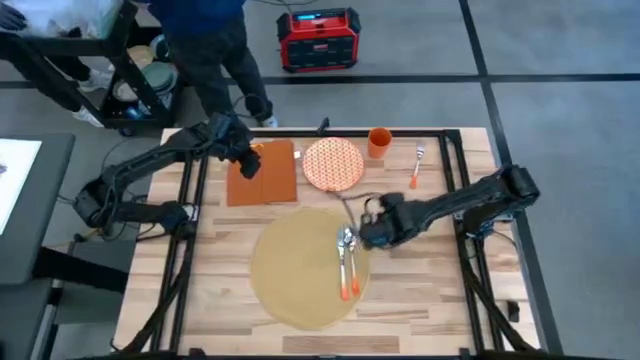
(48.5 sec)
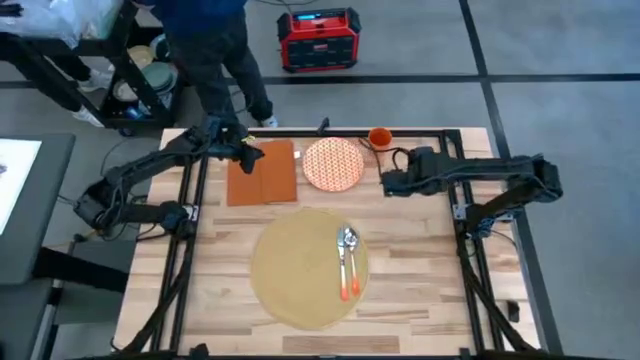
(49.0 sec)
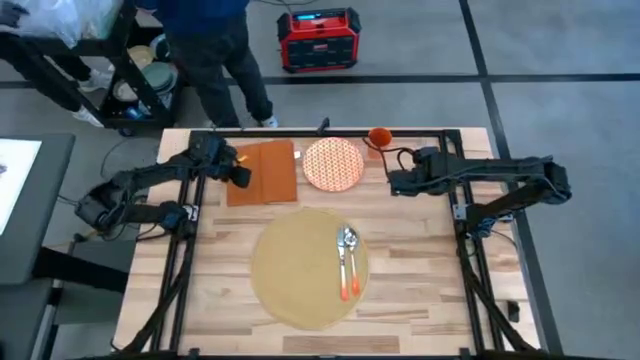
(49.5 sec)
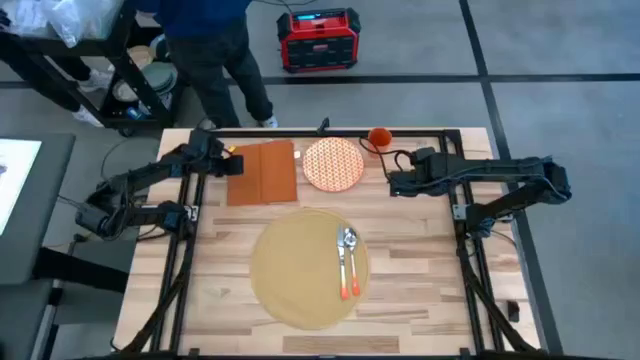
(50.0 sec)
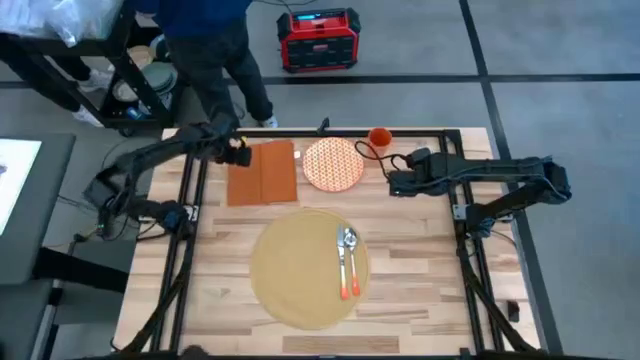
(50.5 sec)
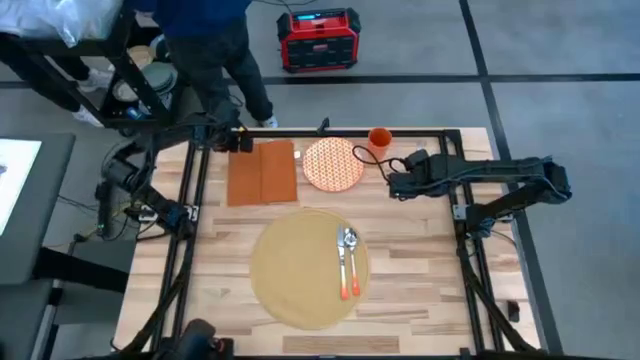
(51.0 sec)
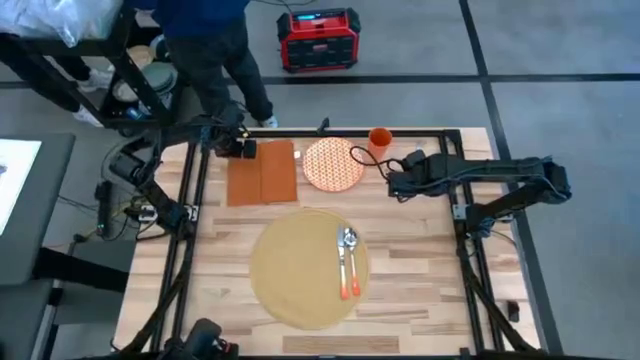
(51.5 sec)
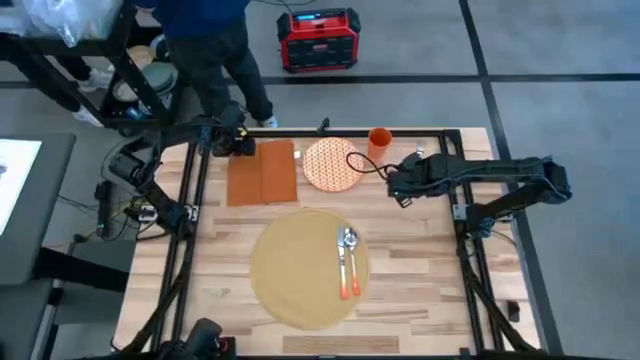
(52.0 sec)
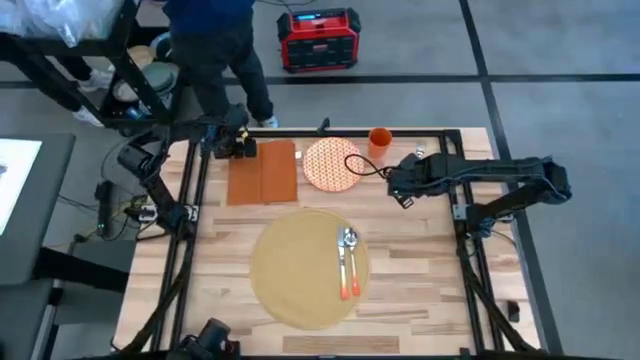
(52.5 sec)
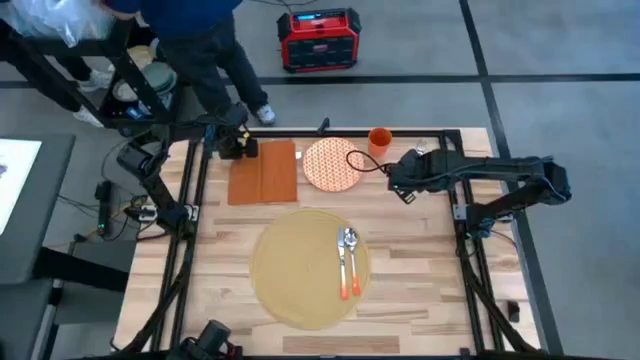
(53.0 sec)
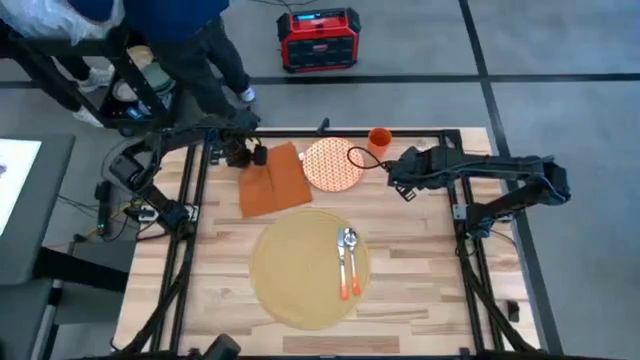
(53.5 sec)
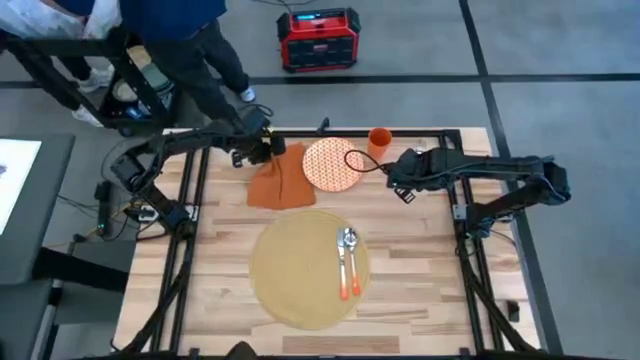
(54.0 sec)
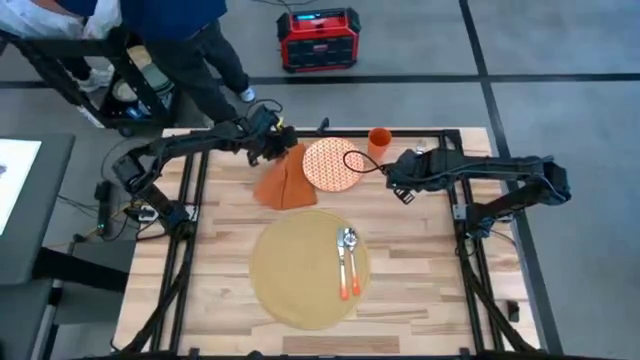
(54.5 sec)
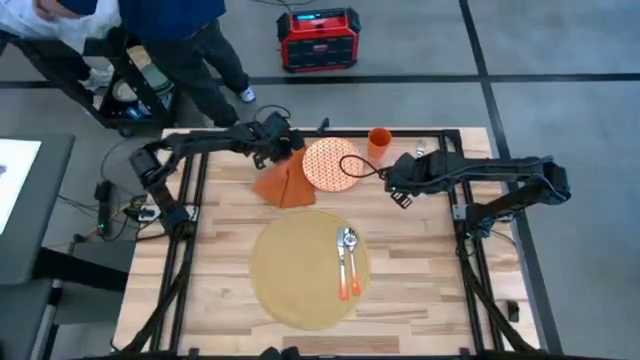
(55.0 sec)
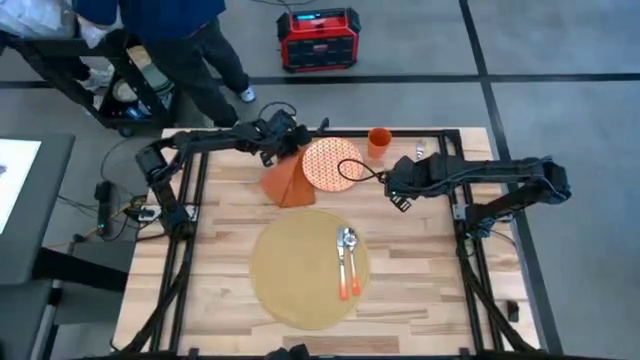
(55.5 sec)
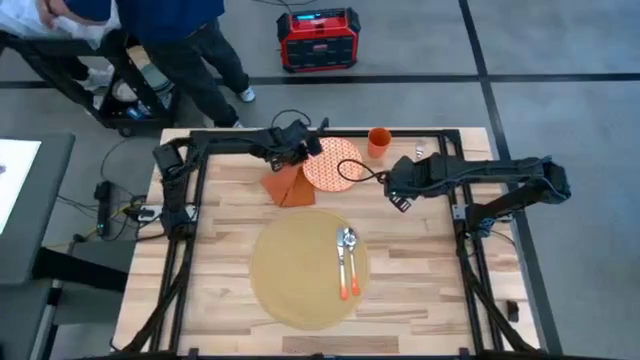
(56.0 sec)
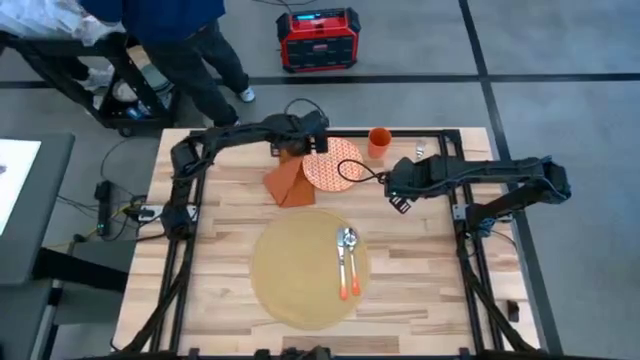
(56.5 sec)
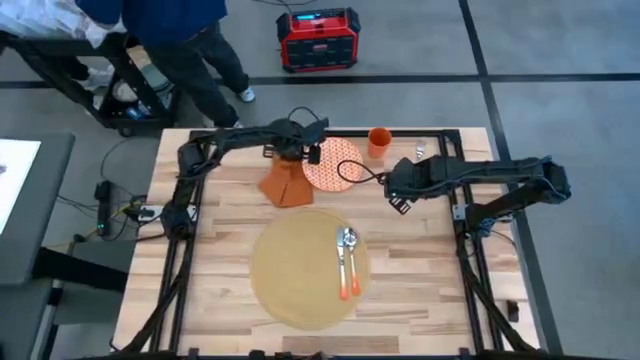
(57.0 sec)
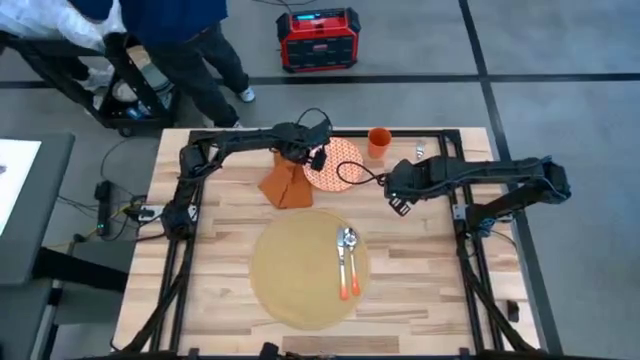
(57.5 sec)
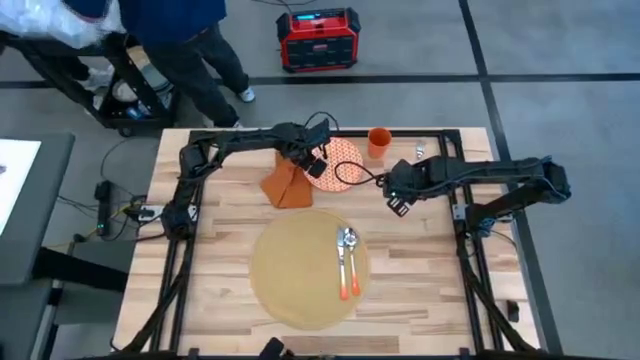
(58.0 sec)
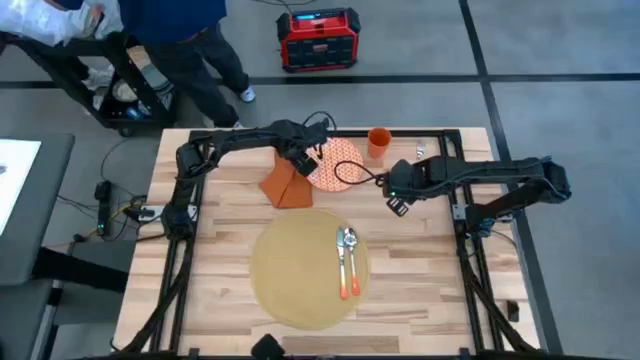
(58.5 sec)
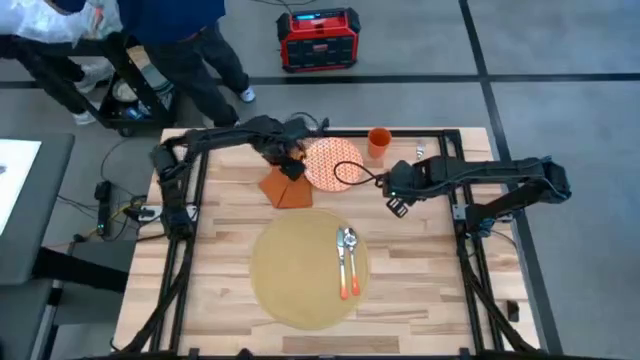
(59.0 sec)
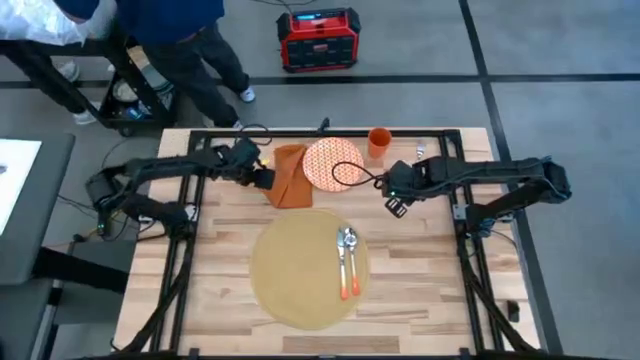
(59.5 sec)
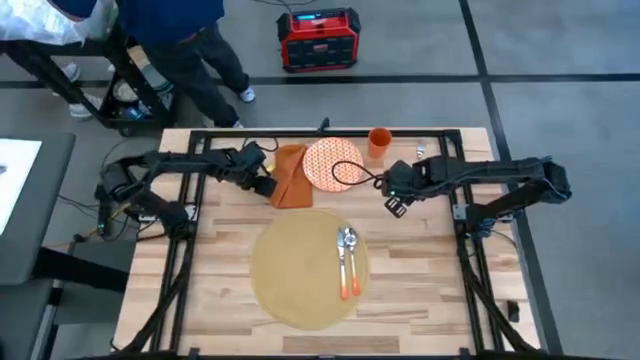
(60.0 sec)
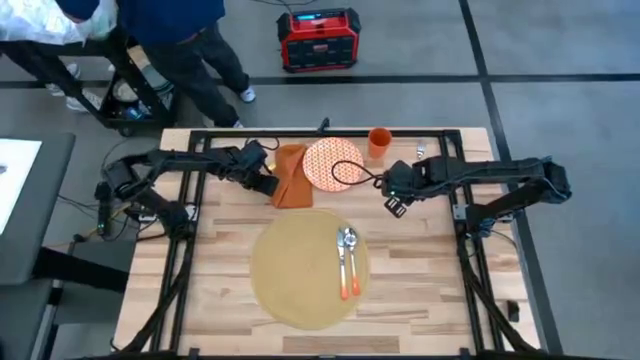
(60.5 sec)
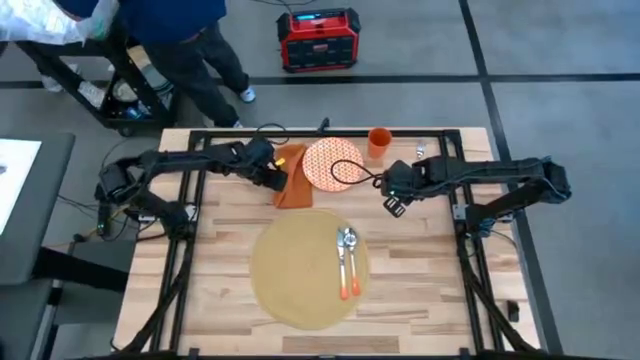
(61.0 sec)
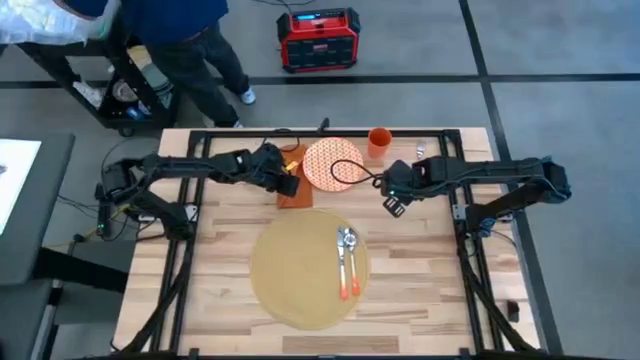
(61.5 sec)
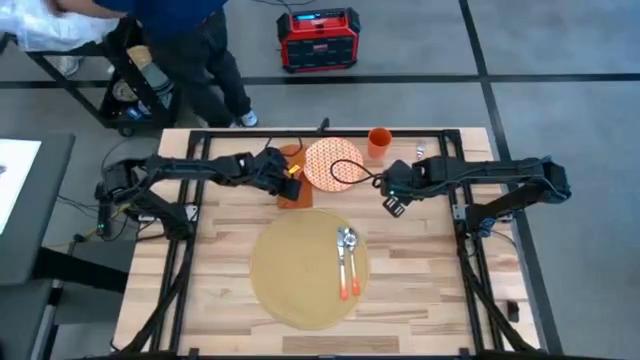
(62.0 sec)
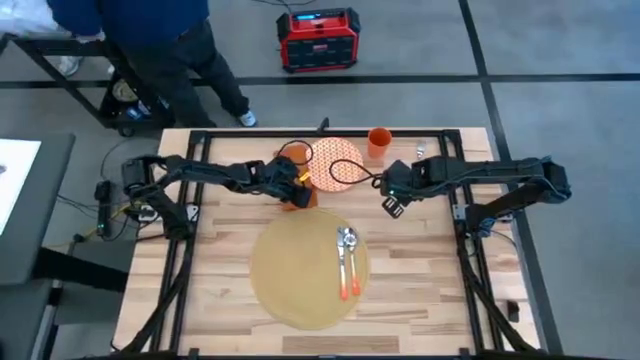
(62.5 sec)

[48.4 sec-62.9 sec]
Task: Set table place
Fold the orange napkin

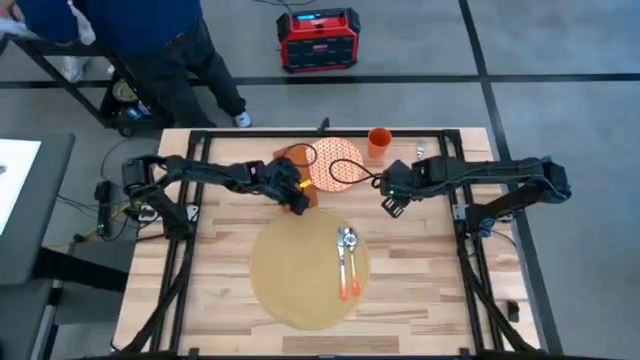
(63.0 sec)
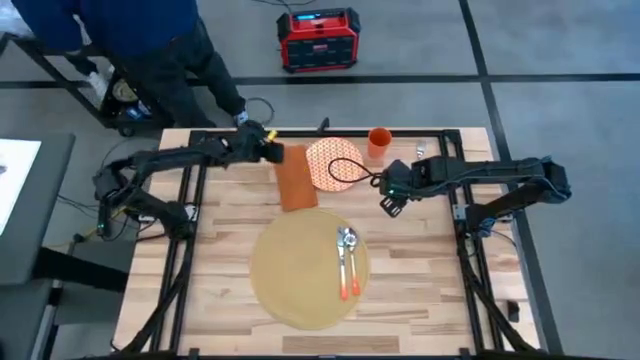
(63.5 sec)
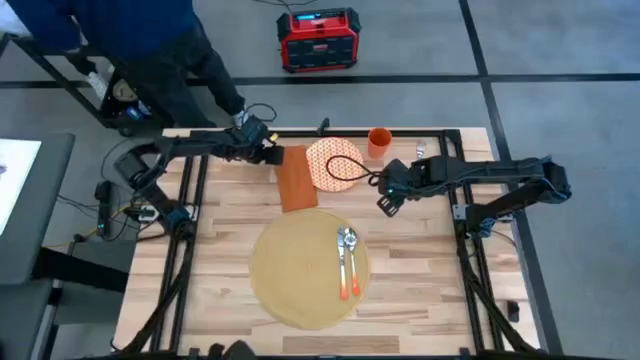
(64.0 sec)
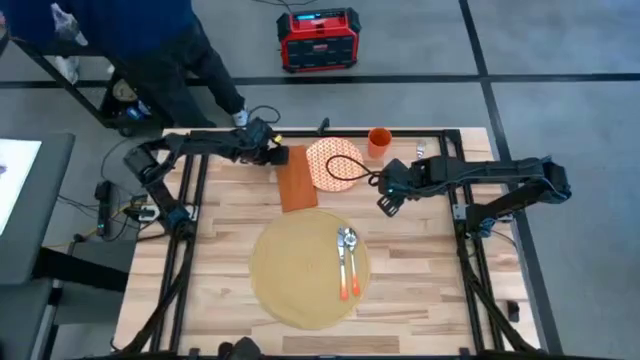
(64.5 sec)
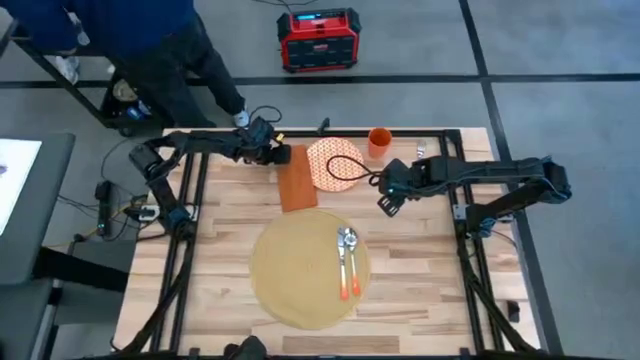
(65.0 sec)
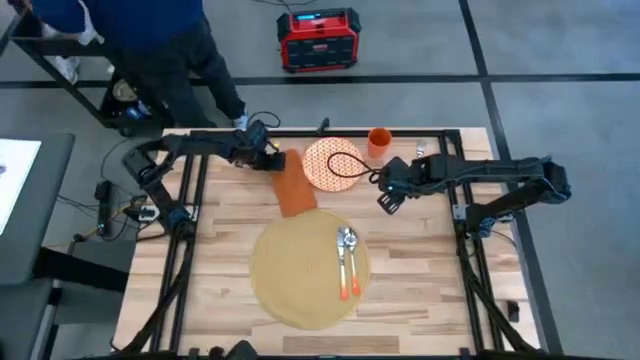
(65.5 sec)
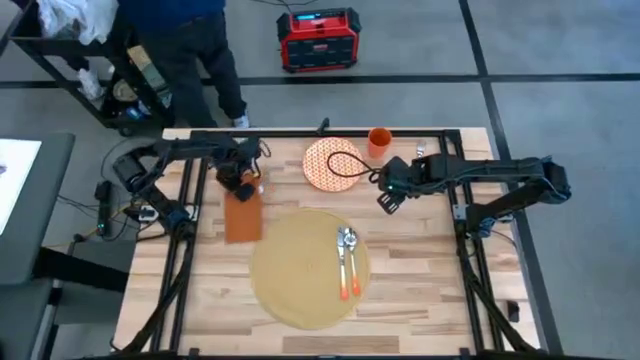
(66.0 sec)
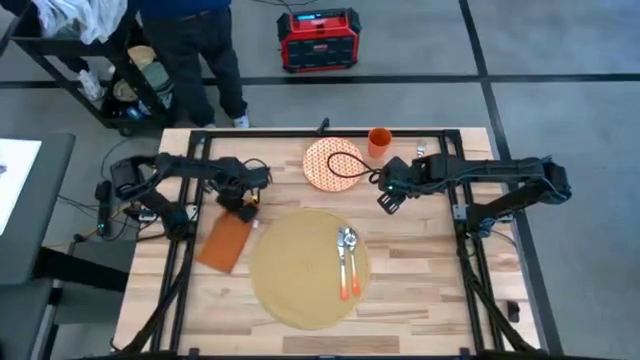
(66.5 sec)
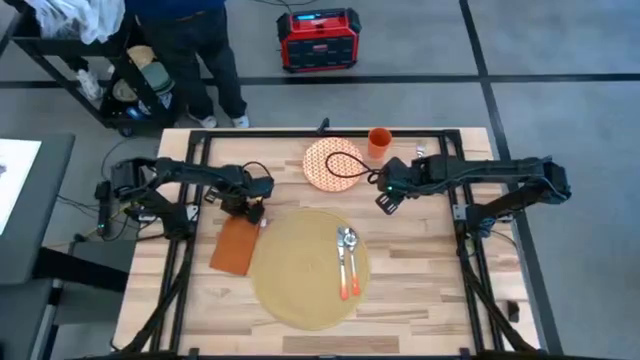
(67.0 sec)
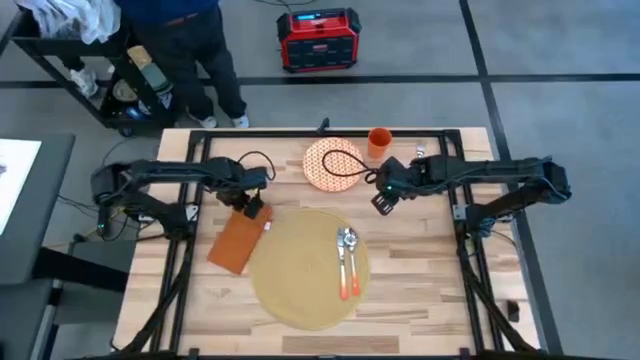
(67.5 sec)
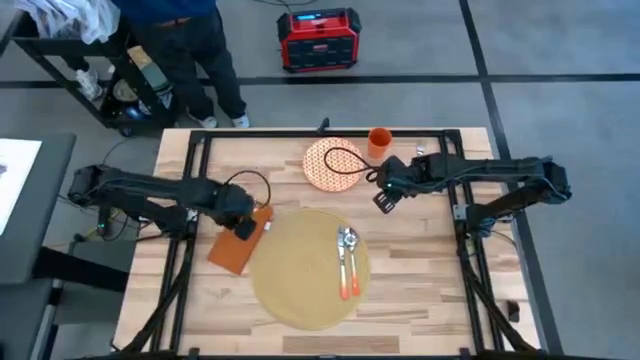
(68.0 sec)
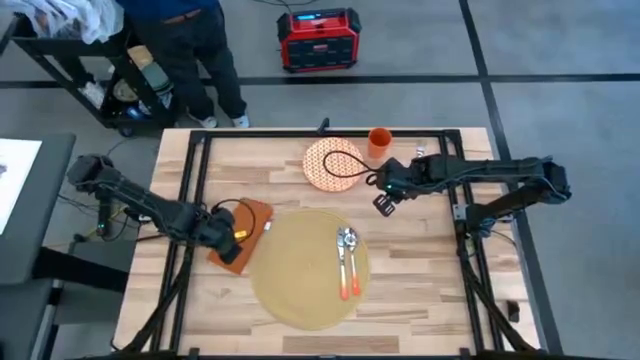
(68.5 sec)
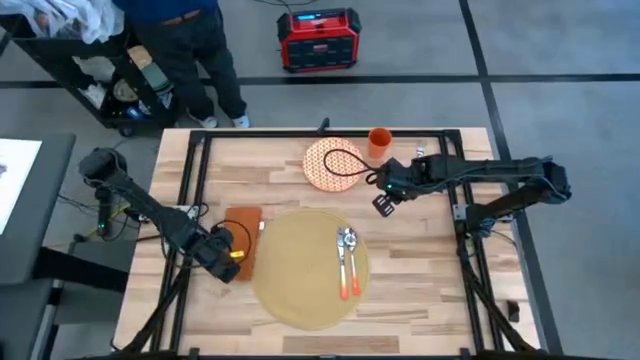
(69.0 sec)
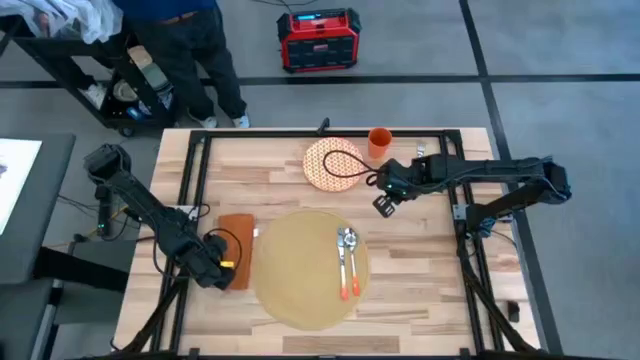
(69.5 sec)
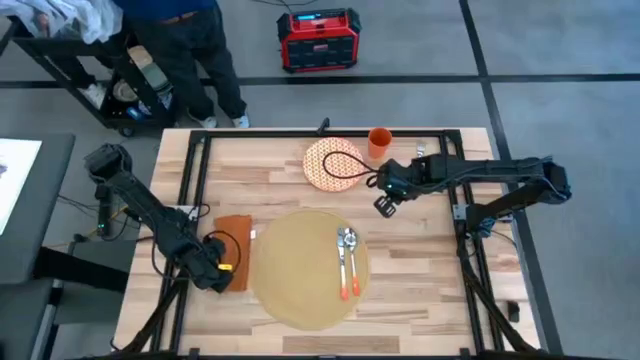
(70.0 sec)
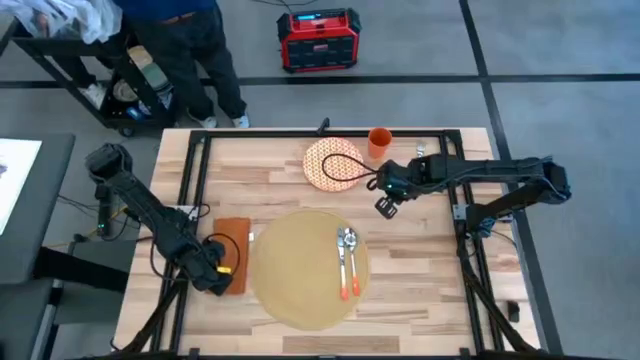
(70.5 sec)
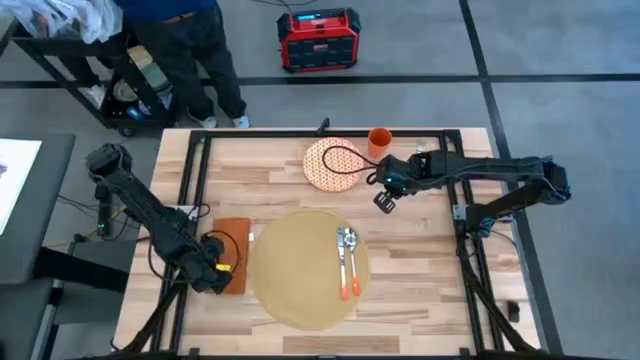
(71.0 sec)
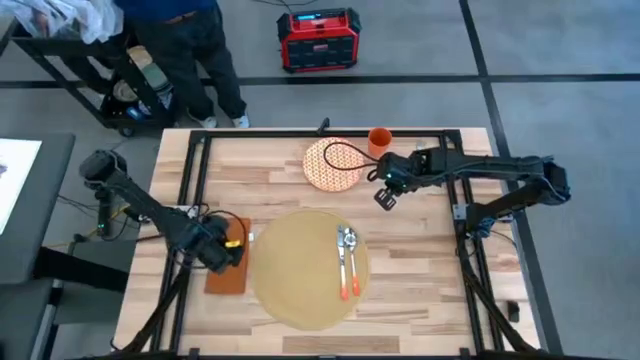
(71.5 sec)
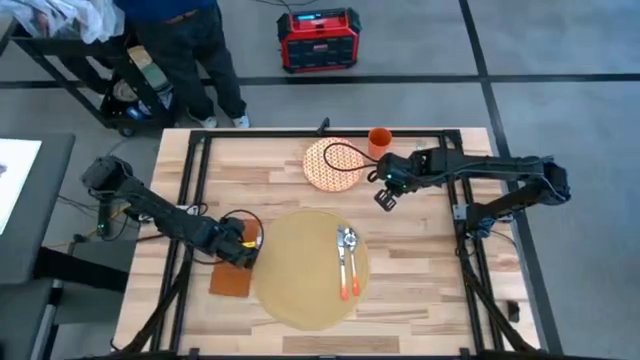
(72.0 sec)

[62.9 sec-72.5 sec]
Move the orange napkin to the left of the brown placemat
